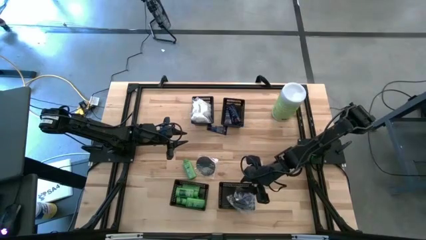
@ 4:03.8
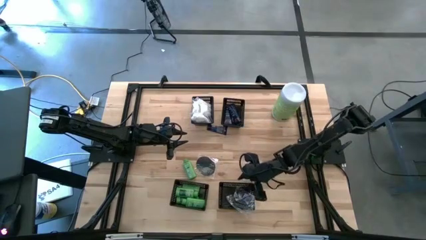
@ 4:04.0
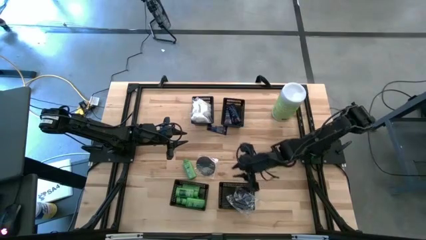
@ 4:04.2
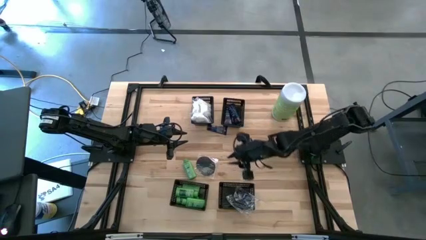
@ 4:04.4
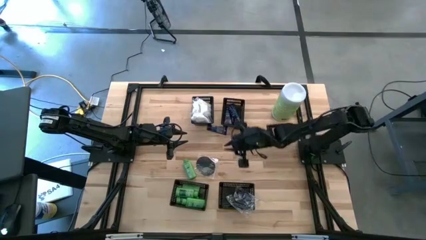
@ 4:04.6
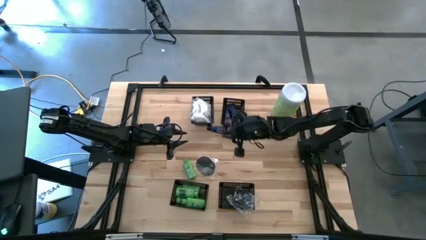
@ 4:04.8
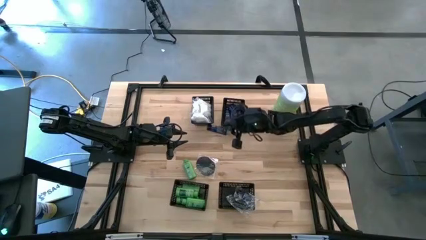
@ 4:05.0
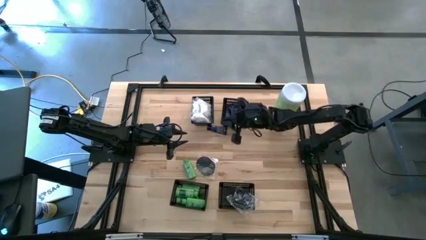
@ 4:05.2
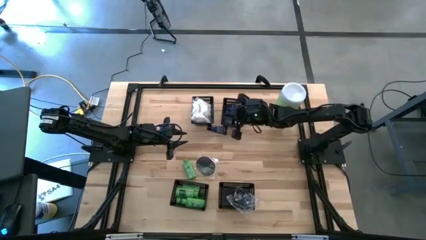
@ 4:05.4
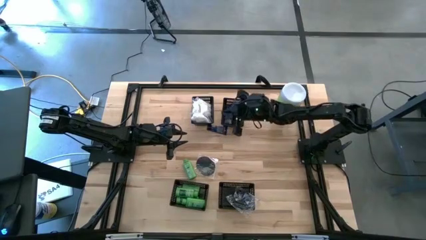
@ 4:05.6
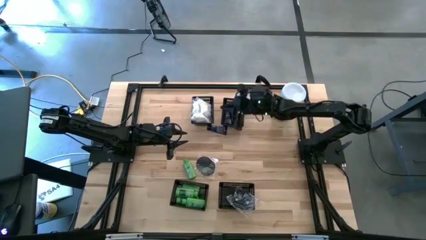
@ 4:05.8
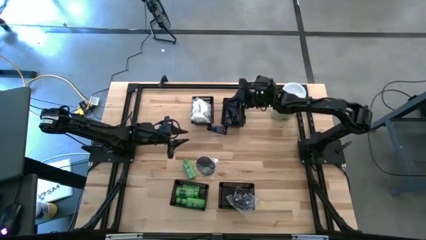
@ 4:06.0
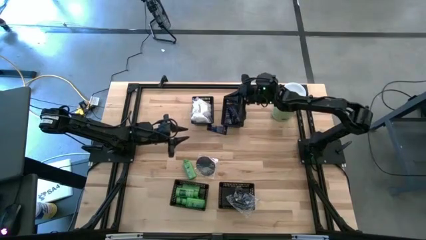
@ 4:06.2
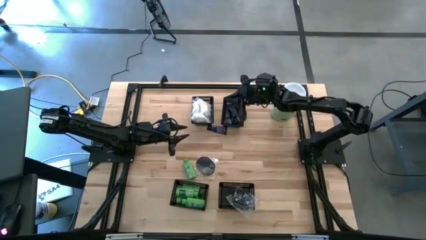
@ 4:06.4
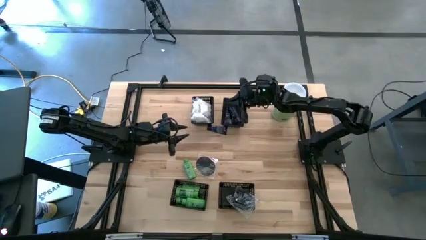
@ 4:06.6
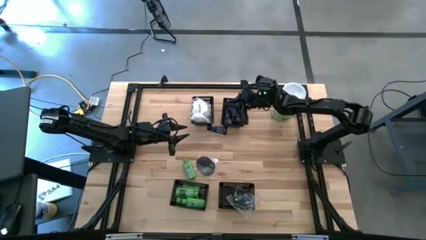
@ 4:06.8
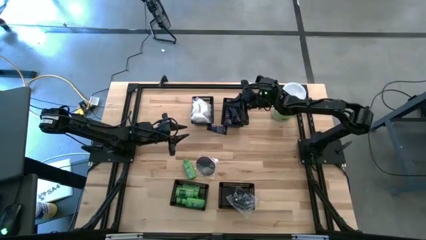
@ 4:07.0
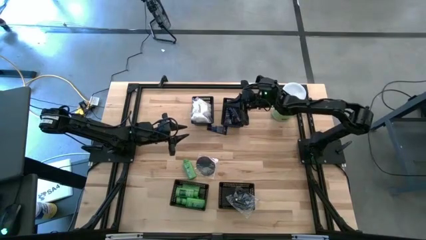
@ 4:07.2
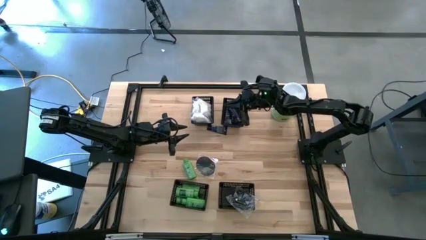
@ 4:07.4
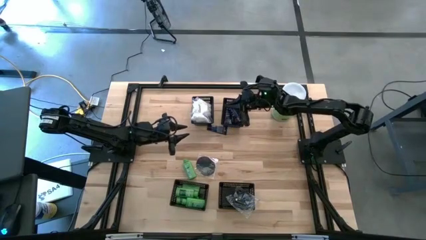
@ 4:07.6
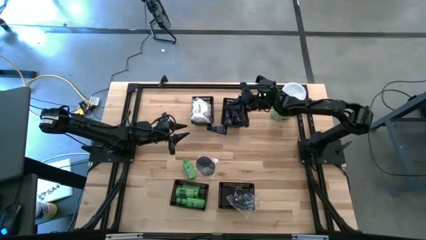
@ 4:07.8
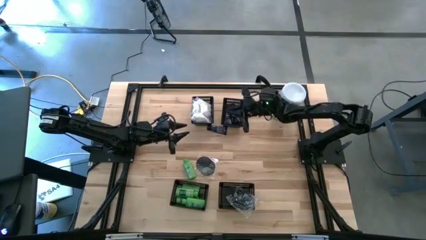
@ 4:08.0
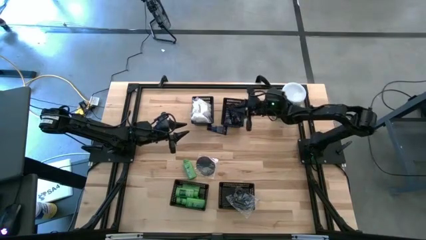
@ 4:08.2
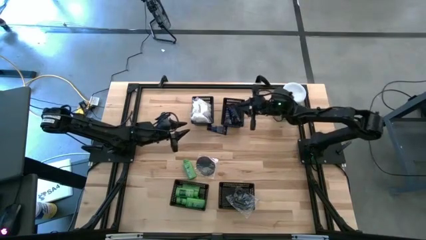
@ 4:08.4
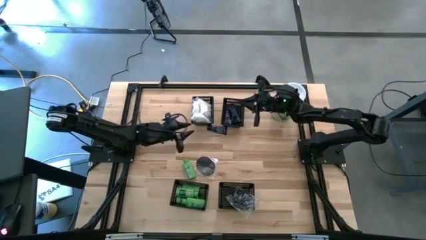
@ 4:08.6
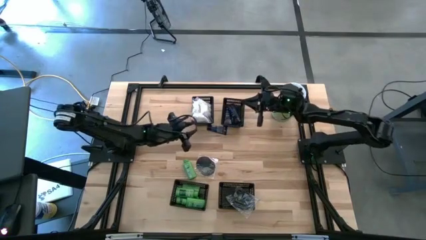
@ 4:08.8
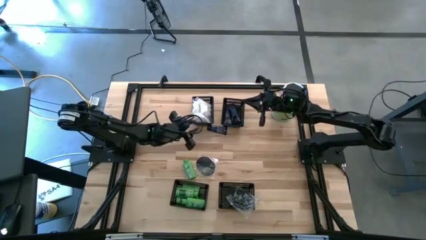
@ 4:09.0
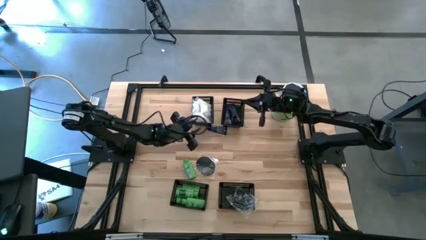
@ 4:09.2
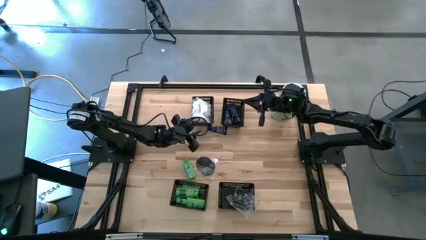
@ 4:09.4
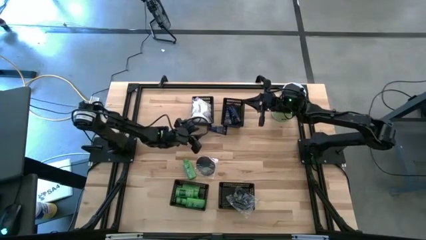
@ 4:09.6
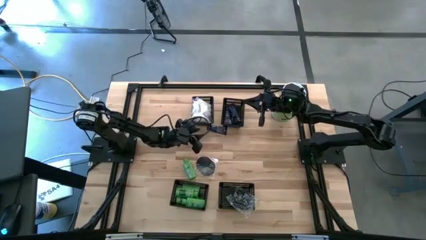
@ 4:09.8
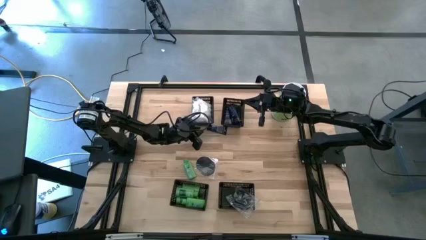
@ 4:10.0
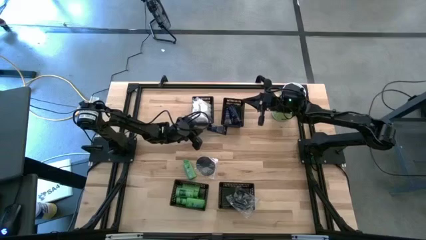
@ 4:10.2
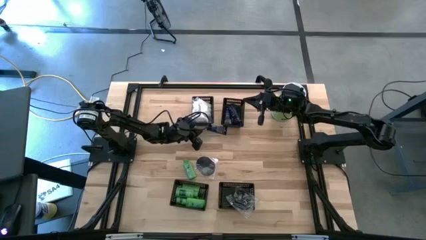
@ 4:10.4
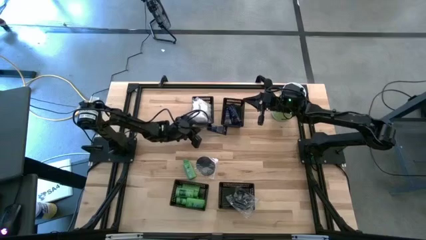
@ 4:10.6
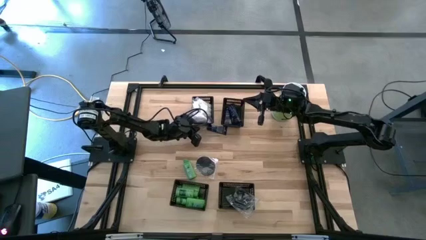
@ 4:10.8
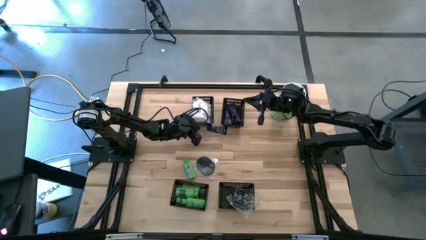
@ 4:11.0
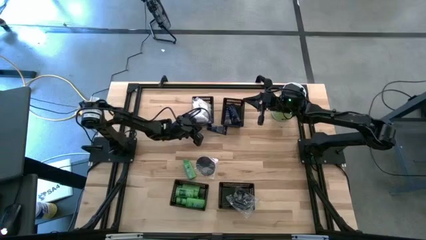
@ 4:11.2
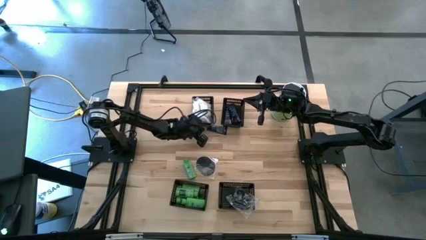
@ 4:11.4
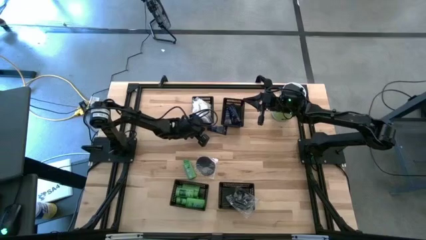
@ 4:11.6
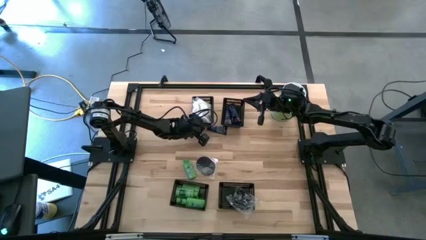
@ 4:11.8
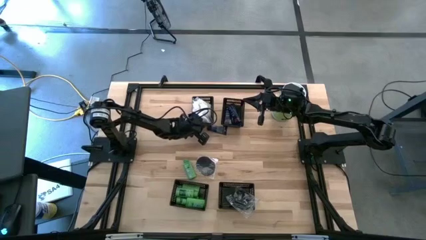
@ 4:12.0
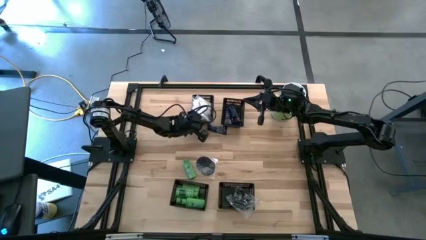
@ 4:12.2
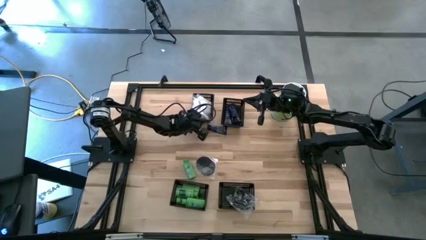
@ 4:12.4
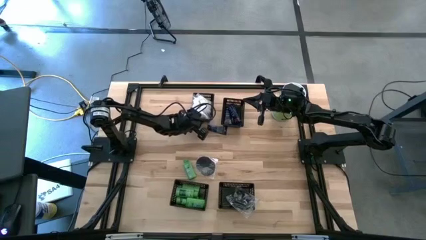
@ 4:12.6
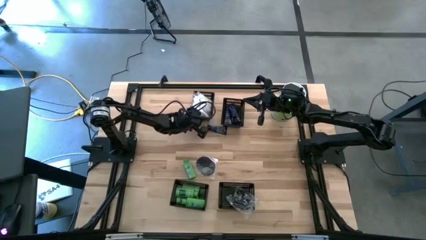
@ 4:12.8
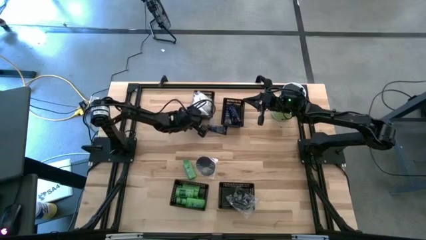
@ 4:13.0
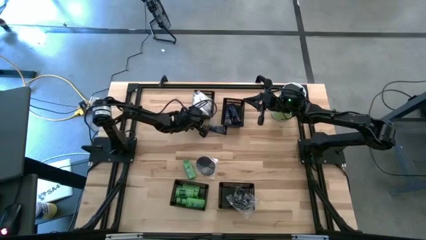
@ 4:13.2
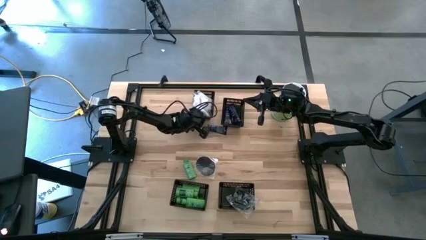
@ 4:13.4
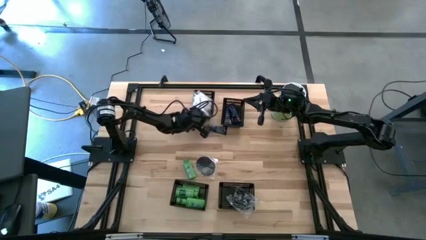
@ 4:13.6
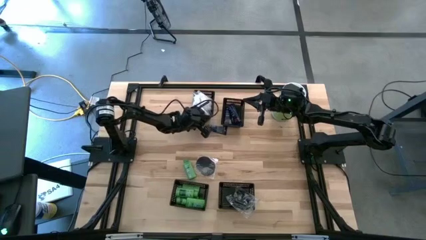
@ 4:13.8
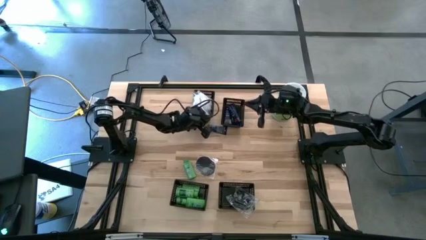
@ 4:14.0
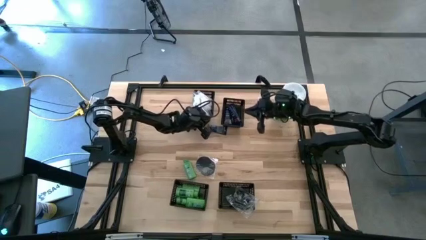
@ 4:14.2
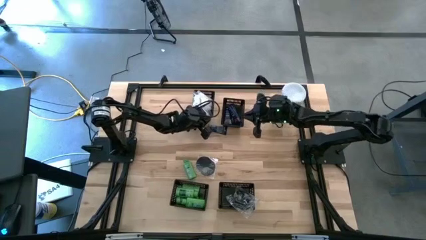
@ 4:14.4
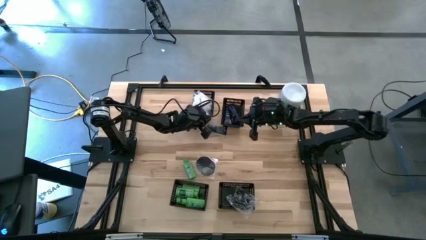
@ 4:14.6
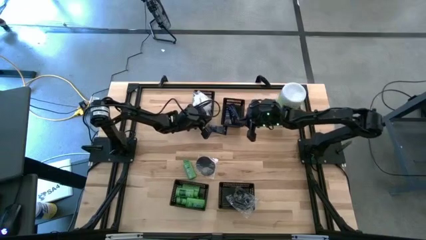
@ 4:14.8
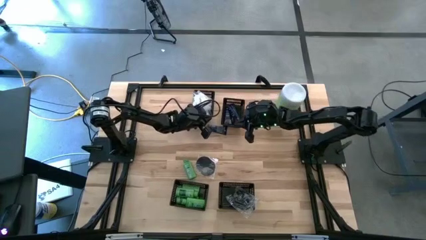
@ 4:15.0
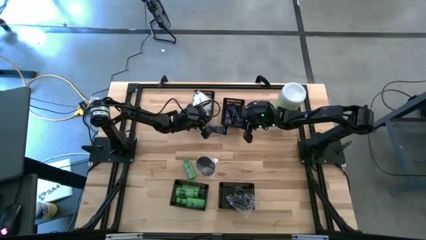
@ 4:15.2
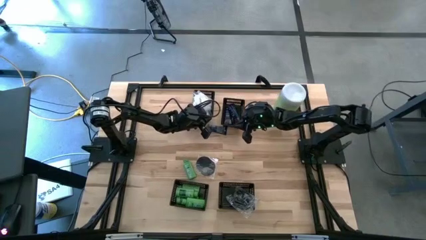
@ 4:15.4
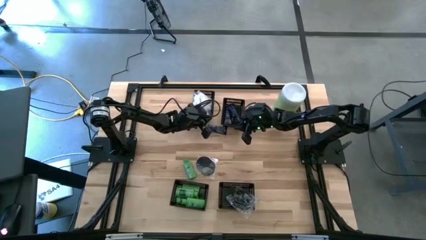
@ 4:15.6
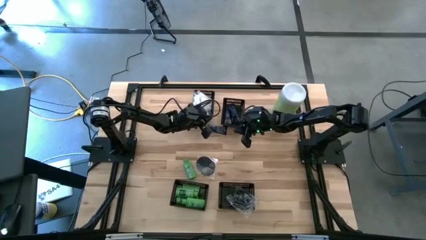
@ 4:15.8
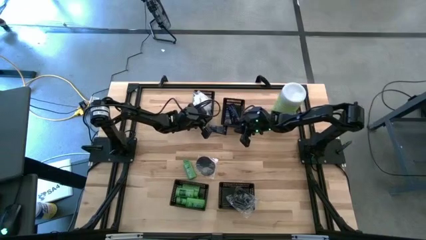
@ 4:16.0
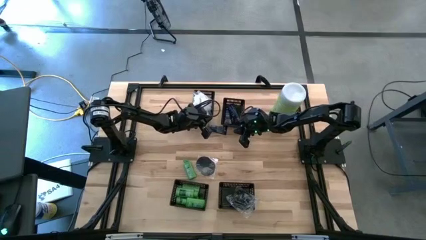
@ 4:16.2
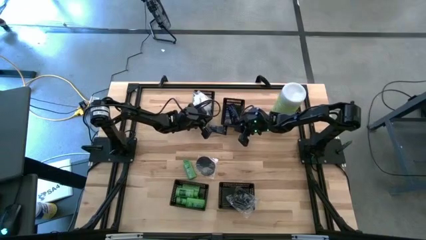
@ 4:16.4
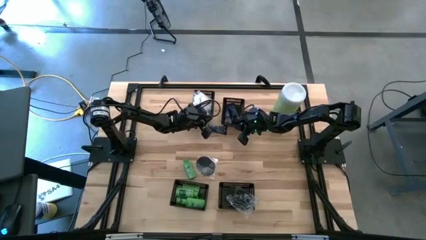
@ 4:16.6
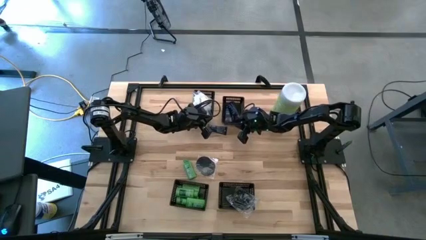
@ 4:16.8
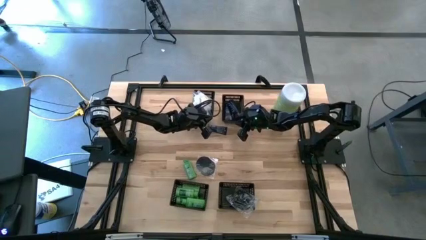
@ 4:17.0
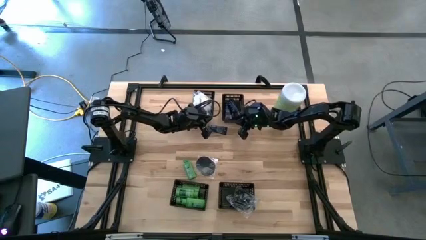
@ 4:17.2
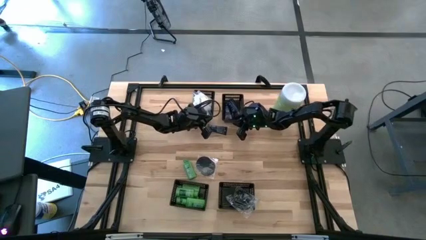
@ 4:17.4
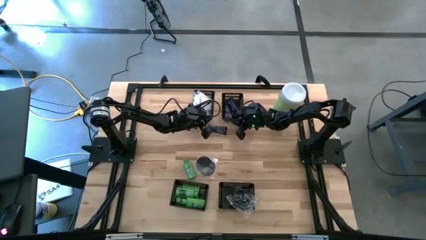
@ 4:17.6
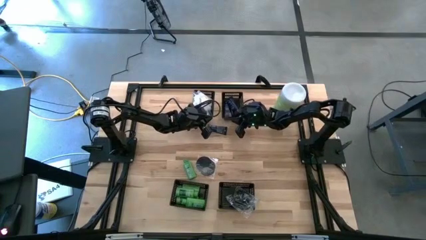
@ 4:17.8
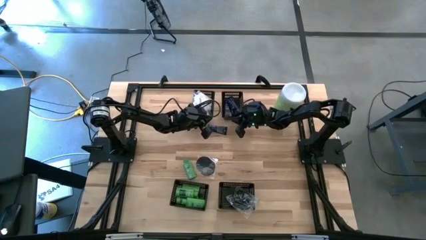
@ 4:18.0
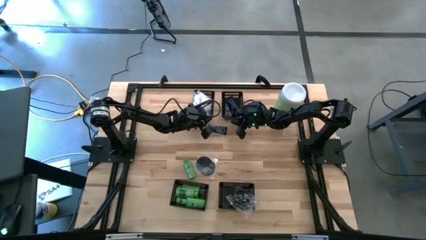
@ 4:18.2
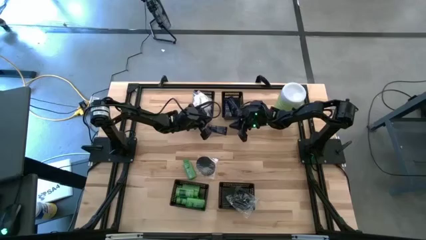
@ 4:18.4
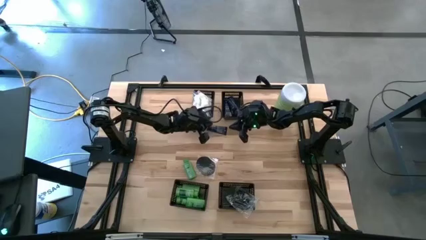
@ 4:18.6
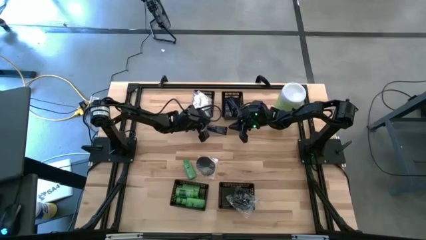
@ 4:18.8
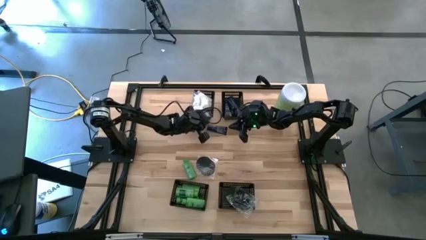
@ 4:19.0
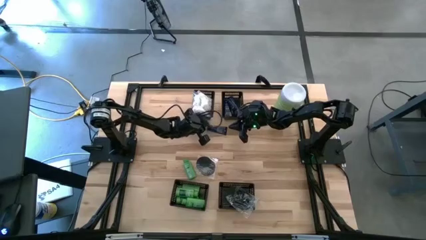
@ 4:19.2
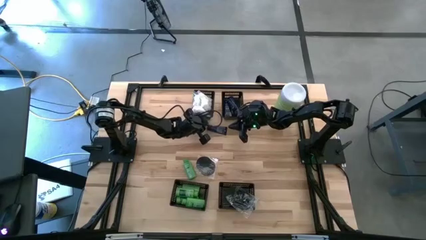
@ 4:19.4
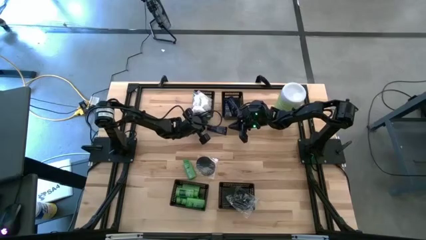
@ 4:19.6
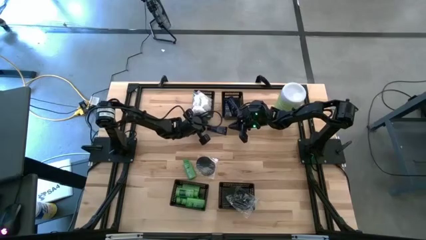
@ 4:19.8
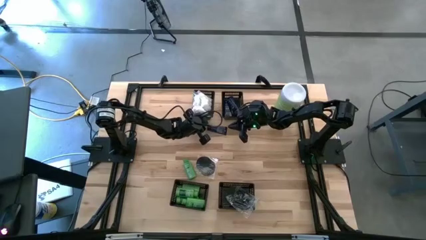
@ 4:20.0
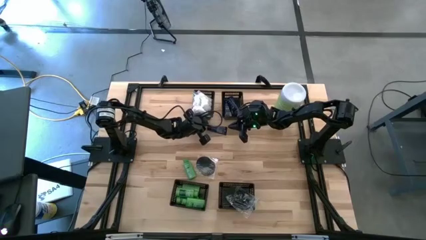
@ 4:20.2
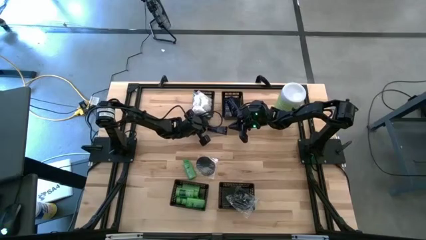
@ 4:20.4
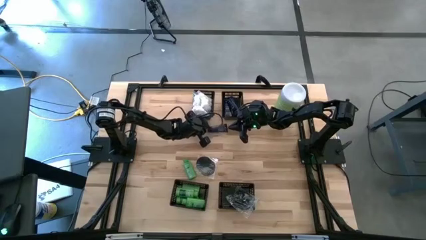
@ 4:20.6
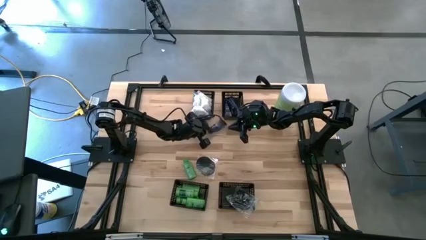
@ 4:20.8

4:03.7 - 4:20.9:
Task: Pick & Place Travel size toiletries
Put the blue shave cream into the top right black bin
